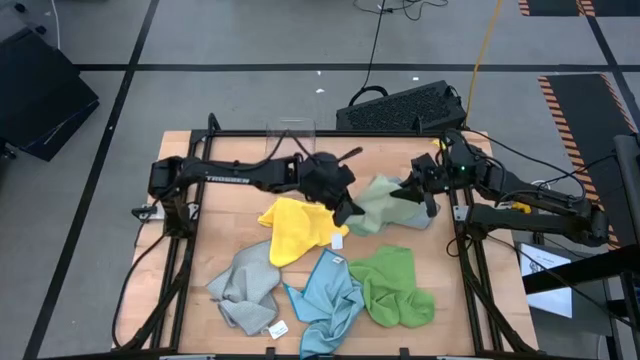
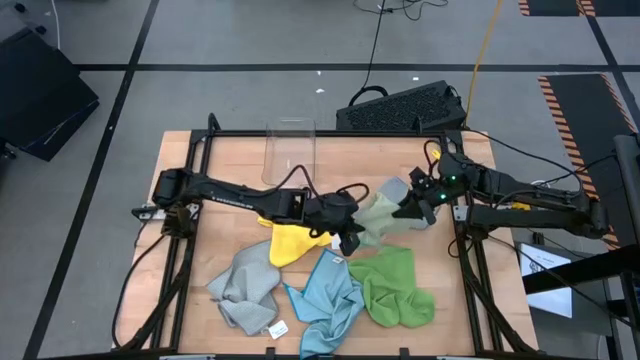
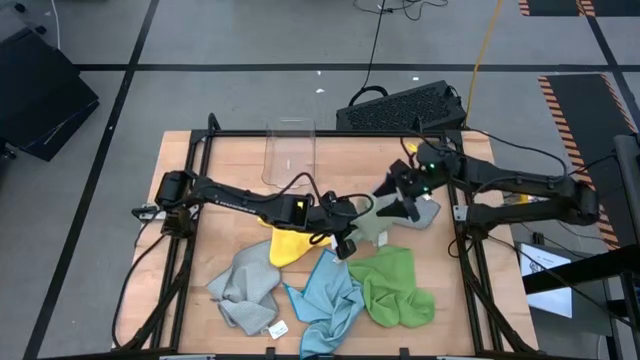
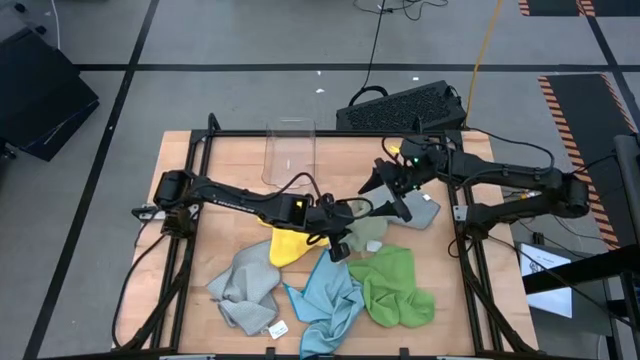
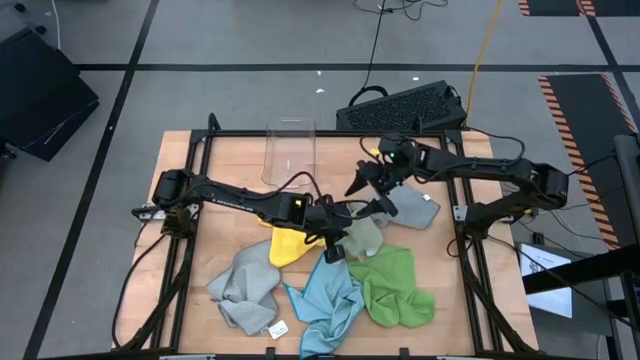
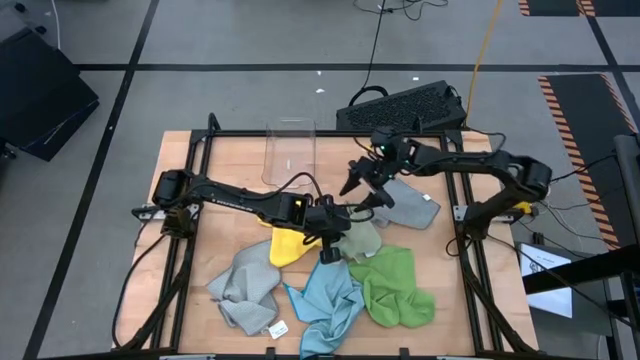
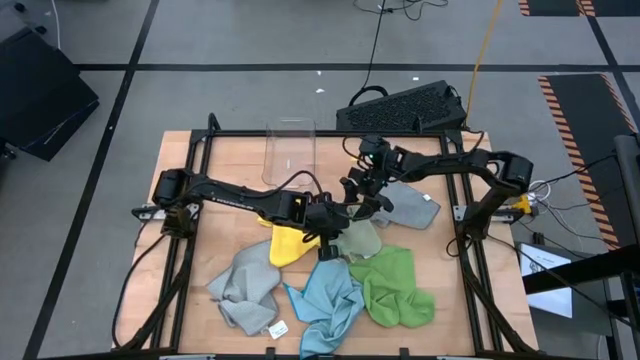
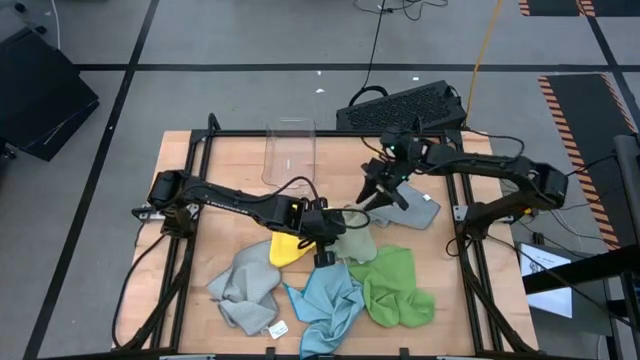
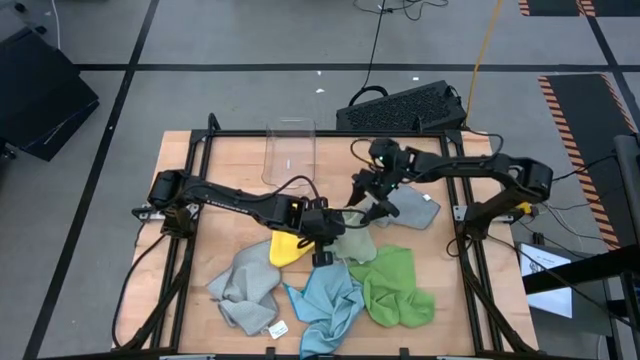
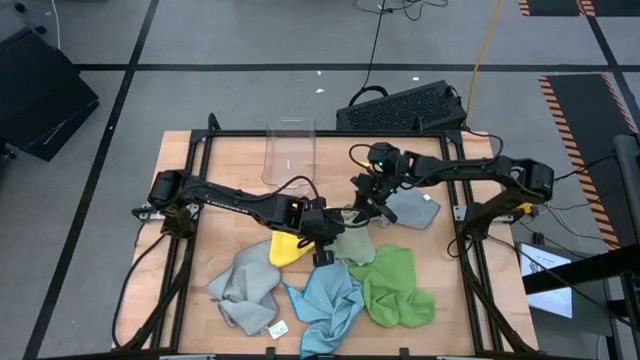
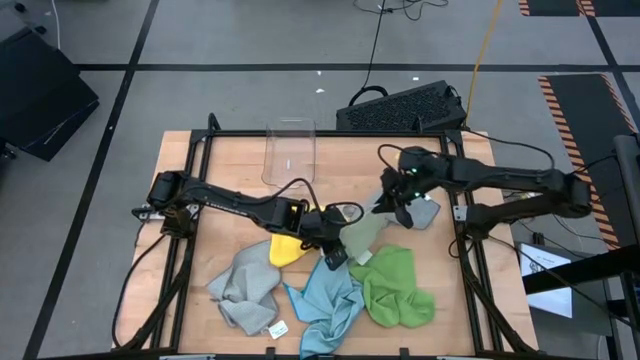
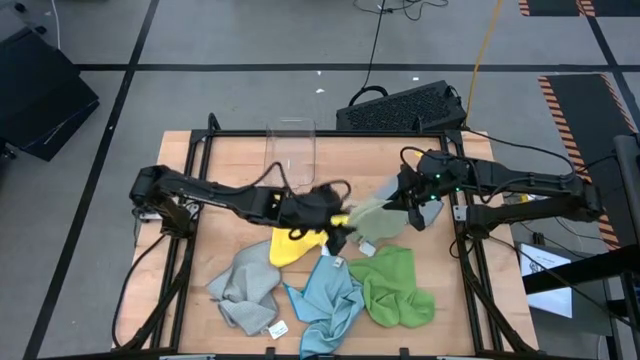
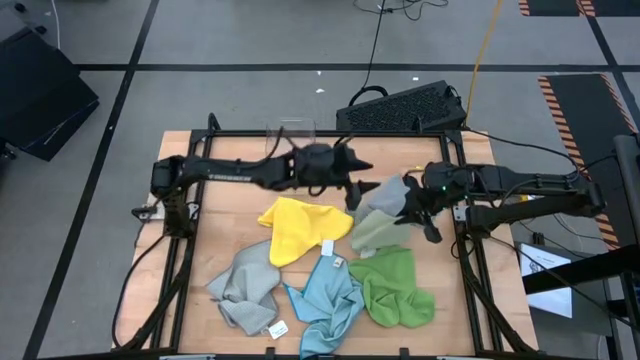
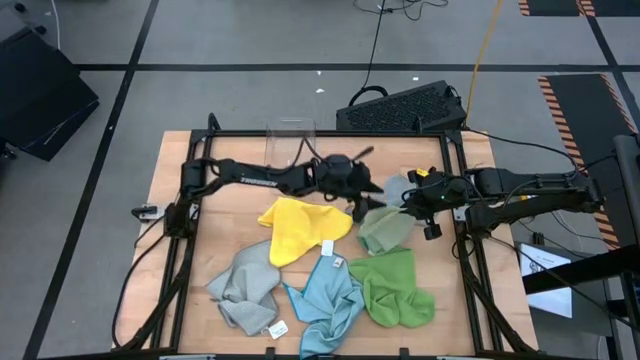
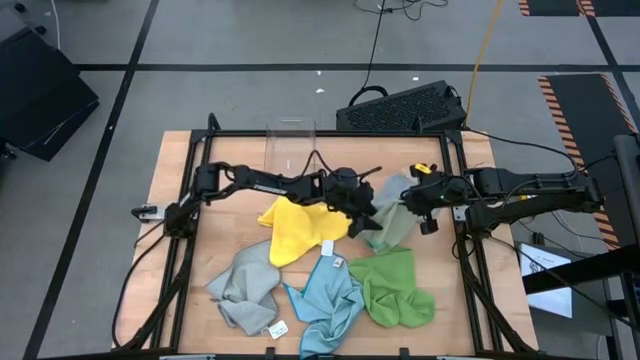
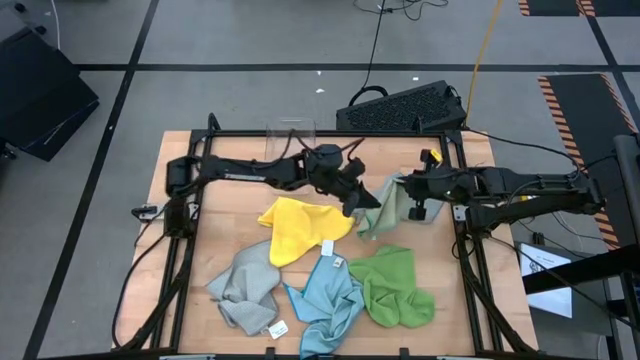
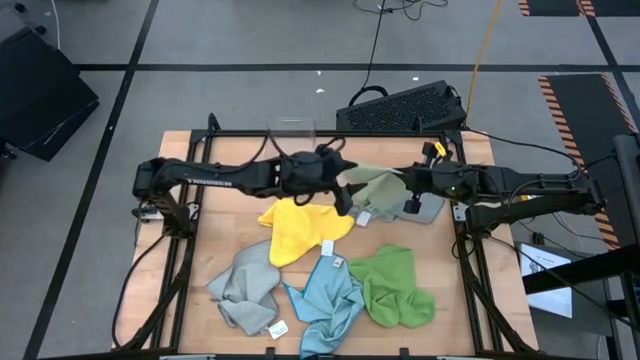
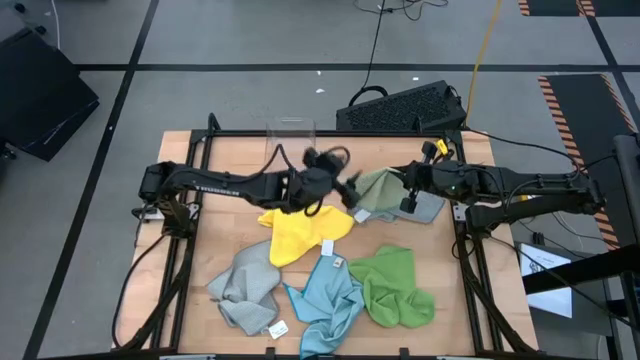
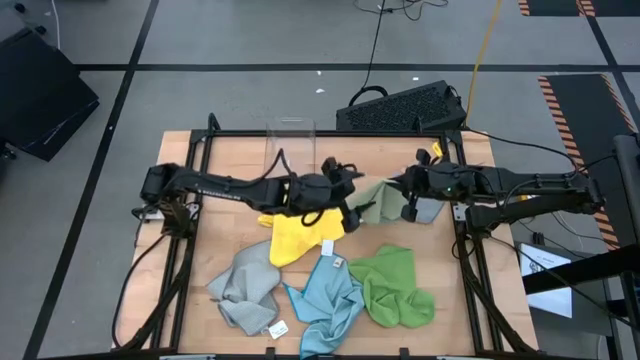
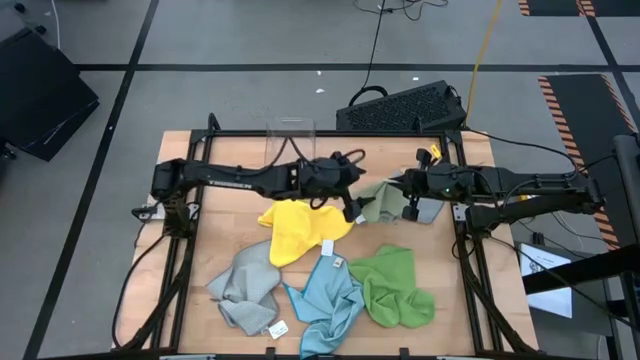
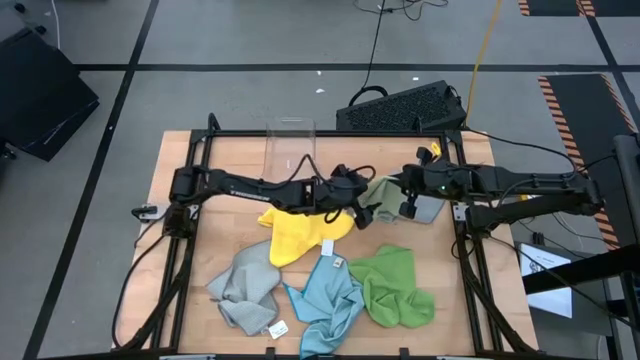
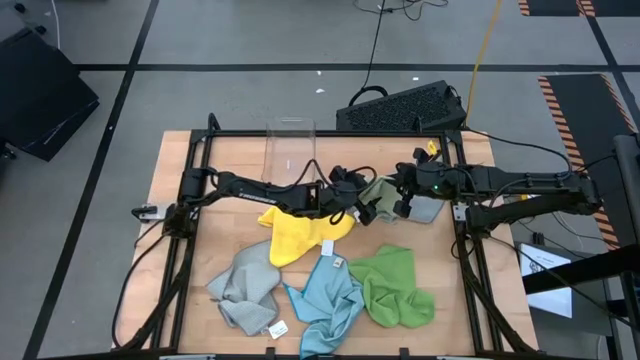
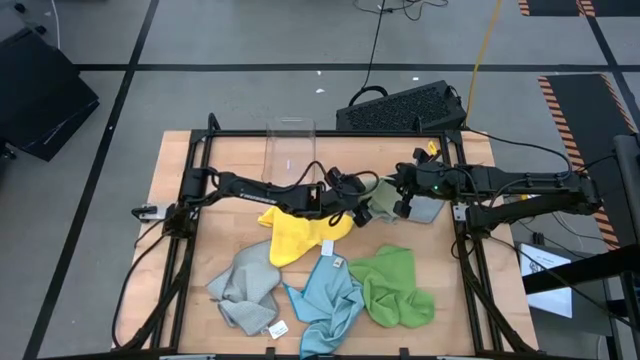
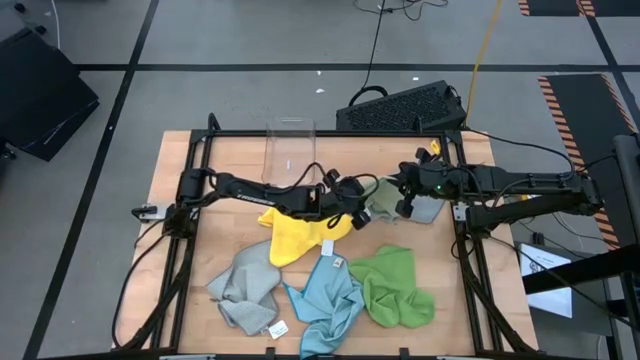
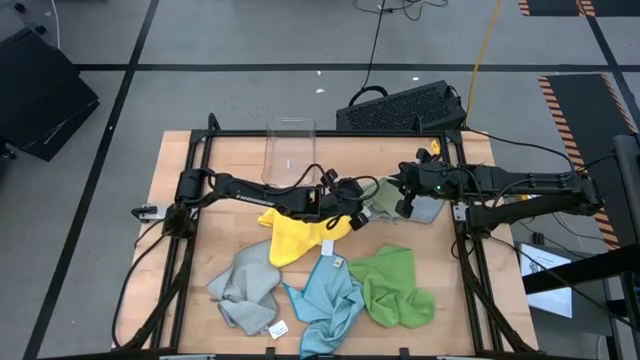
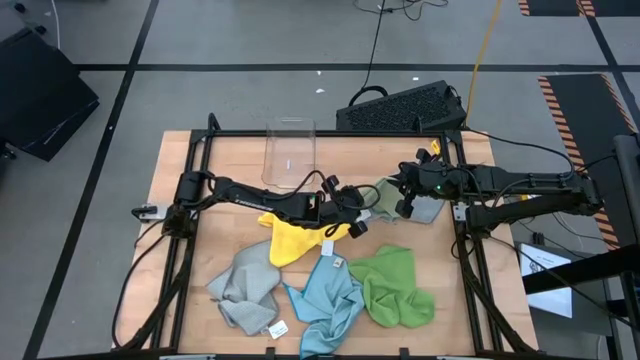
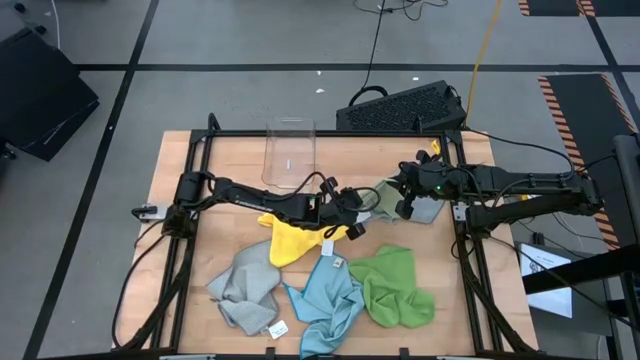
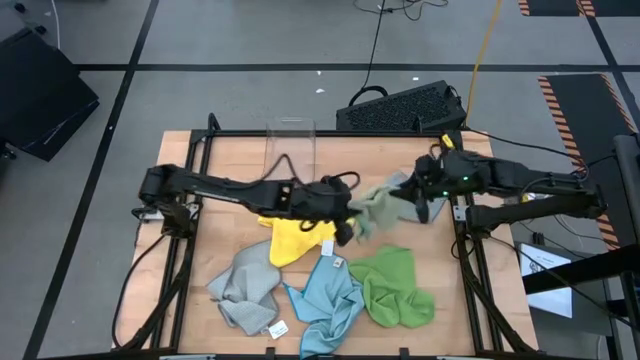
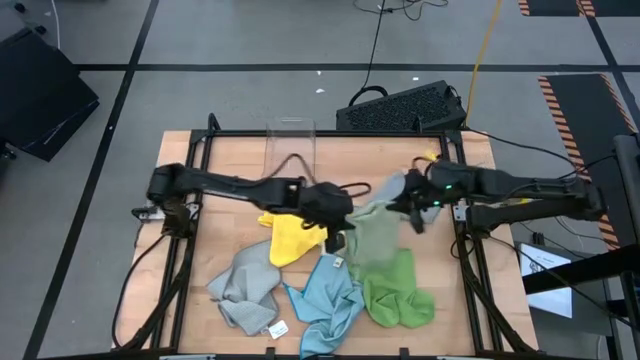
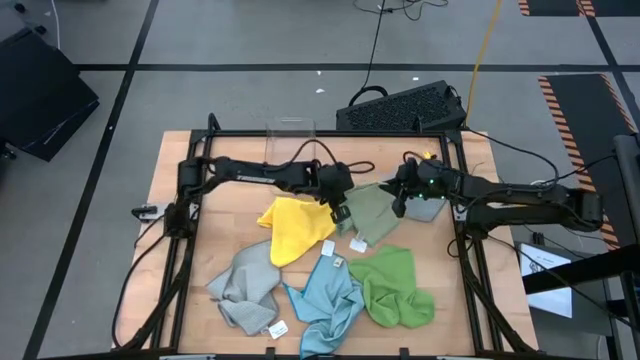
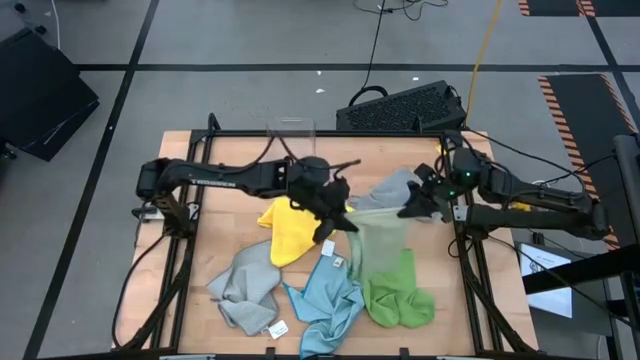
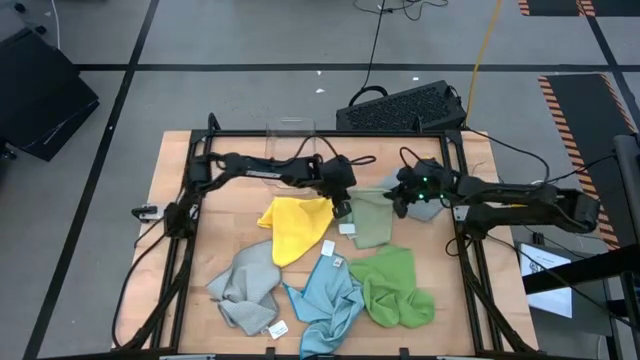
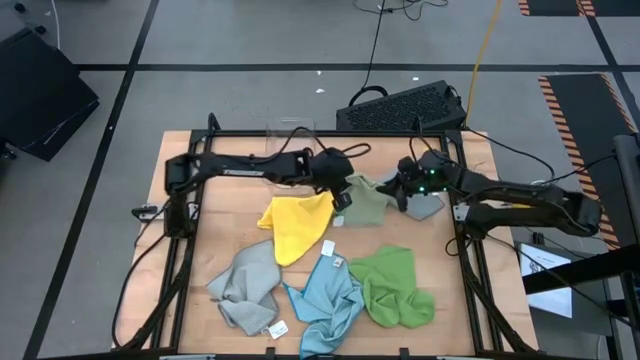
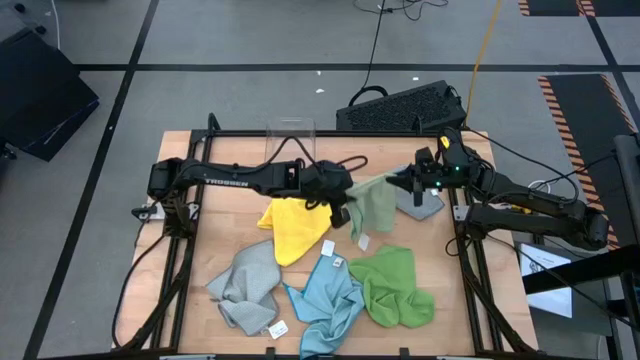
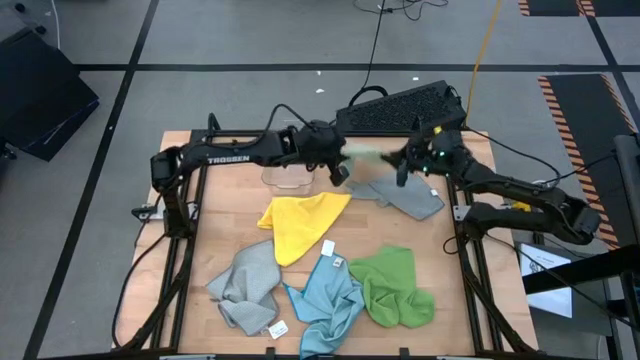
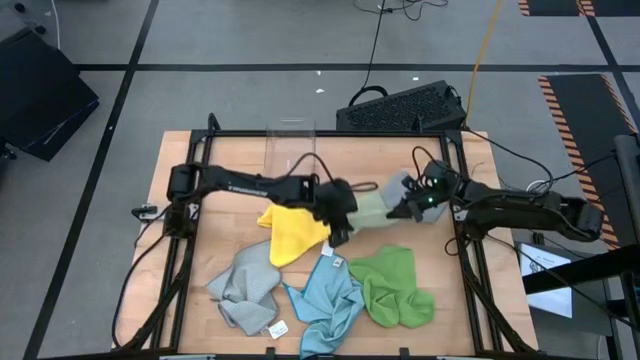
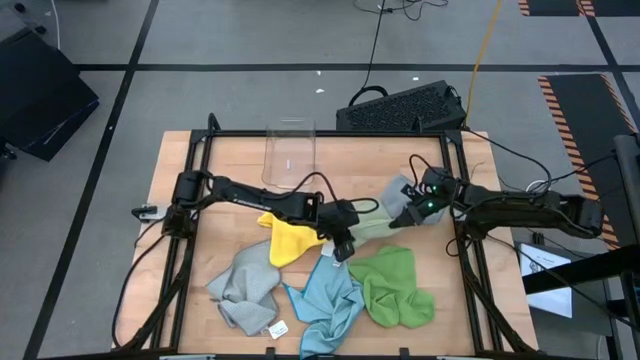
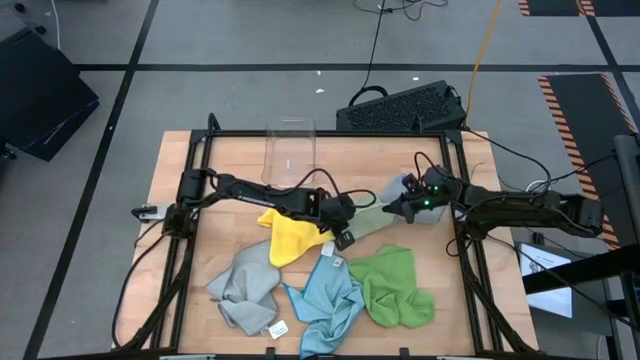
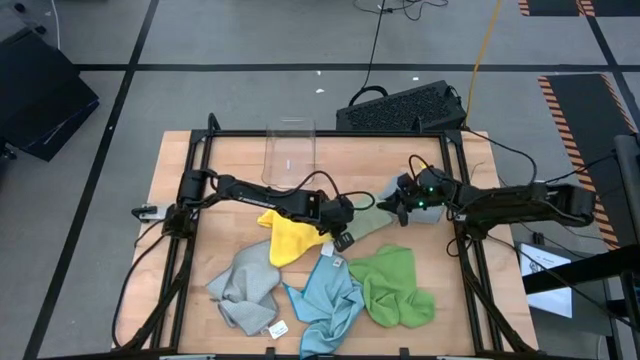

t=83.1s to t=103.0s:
Task: Fold microfiber towels
Fold the light green microfiber cloth
